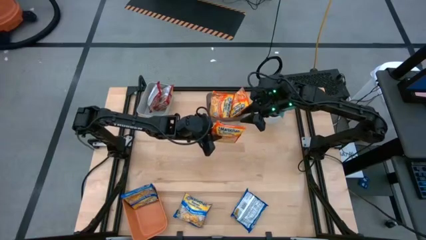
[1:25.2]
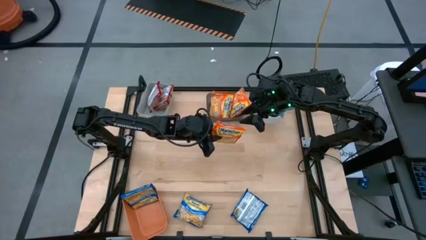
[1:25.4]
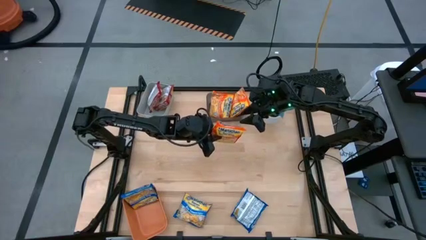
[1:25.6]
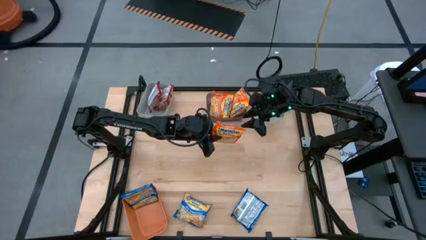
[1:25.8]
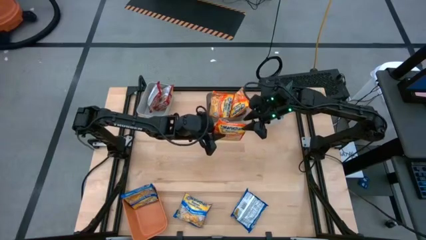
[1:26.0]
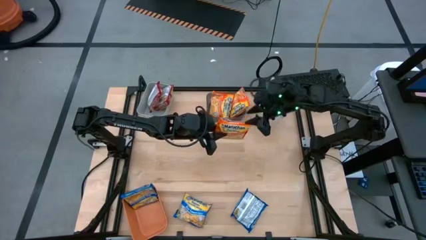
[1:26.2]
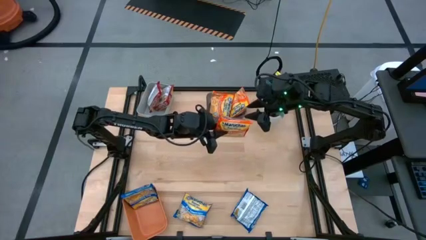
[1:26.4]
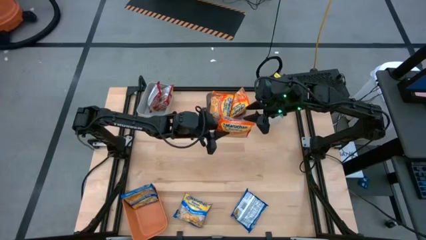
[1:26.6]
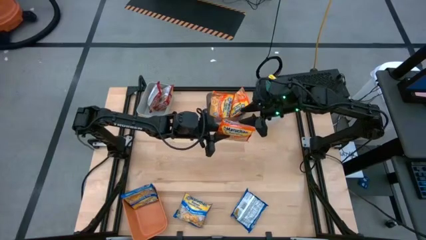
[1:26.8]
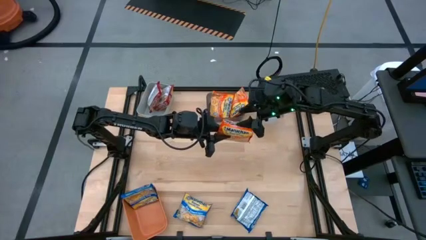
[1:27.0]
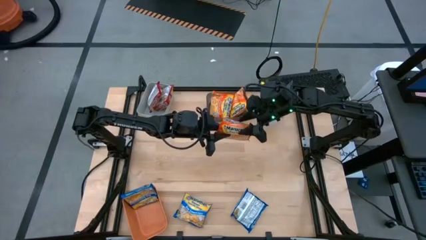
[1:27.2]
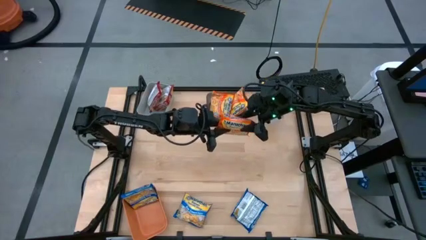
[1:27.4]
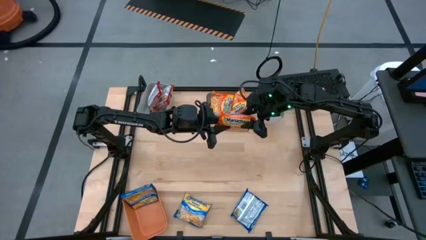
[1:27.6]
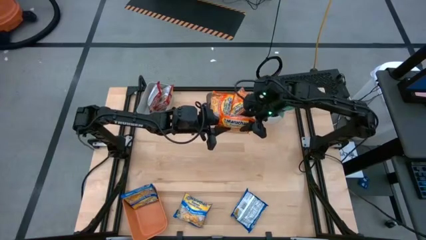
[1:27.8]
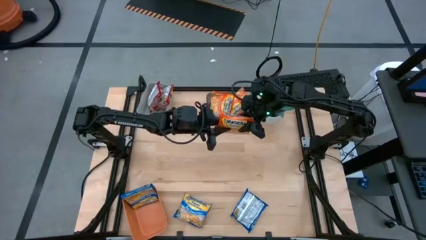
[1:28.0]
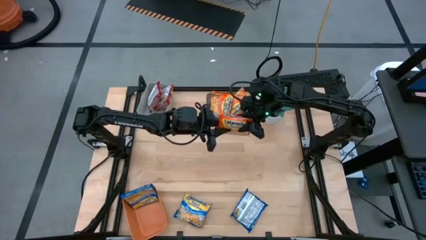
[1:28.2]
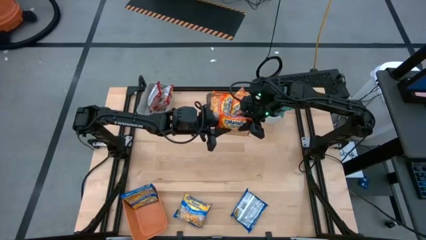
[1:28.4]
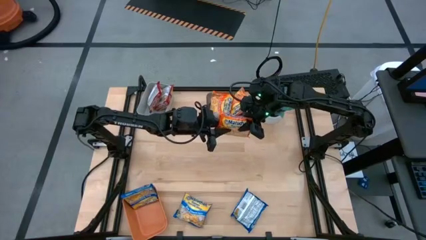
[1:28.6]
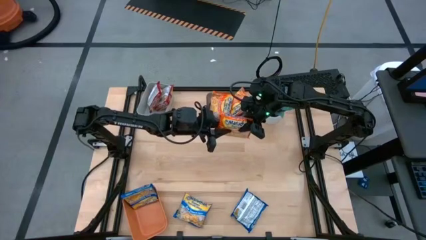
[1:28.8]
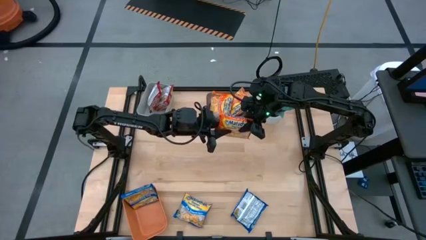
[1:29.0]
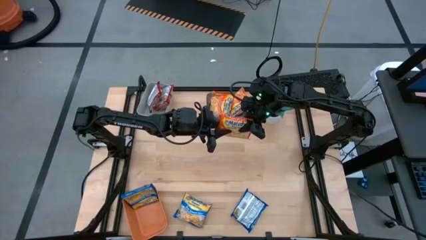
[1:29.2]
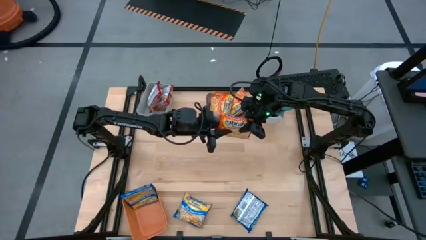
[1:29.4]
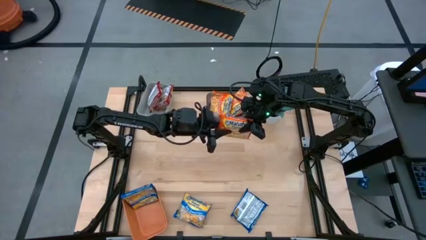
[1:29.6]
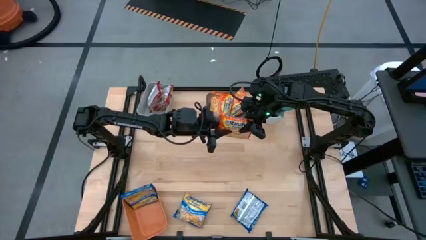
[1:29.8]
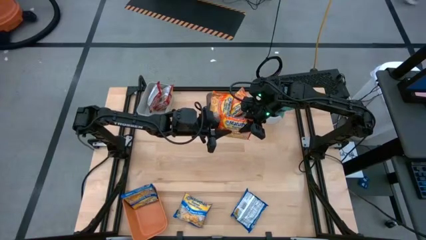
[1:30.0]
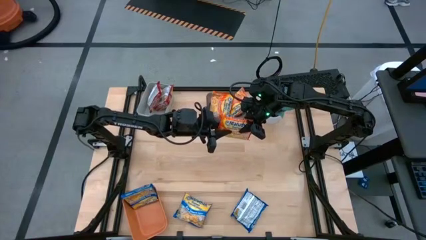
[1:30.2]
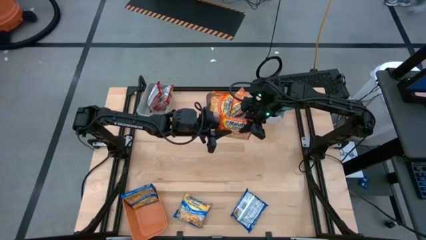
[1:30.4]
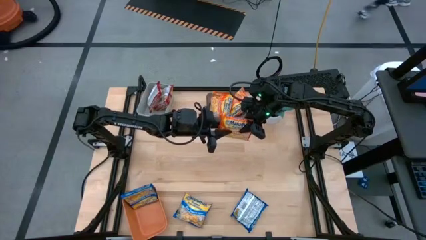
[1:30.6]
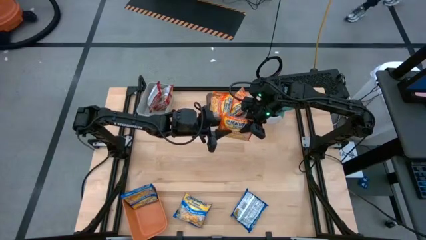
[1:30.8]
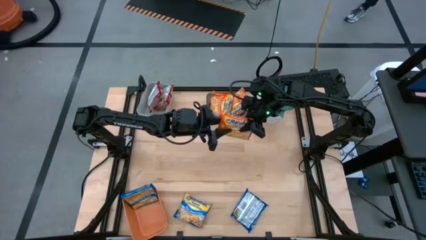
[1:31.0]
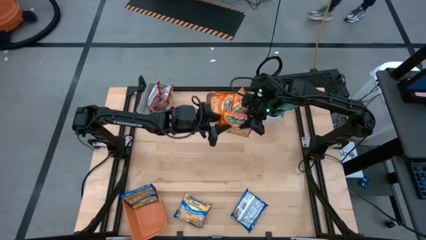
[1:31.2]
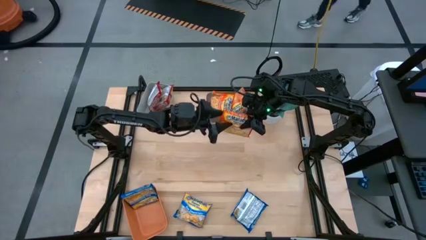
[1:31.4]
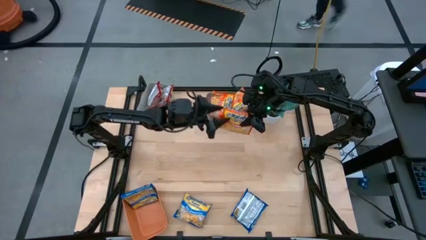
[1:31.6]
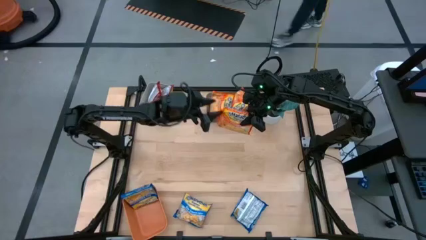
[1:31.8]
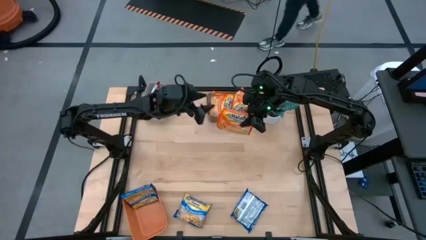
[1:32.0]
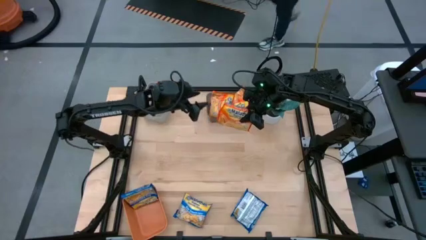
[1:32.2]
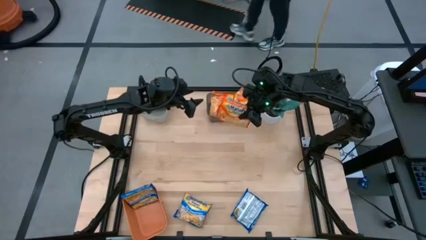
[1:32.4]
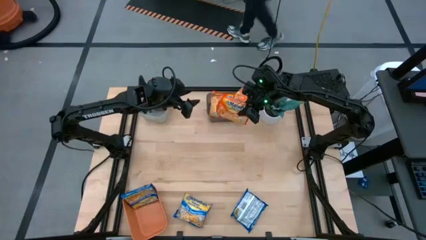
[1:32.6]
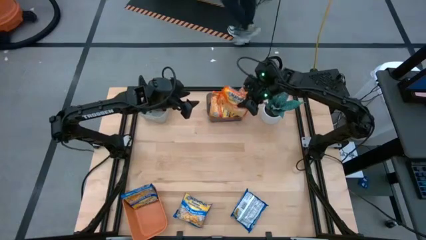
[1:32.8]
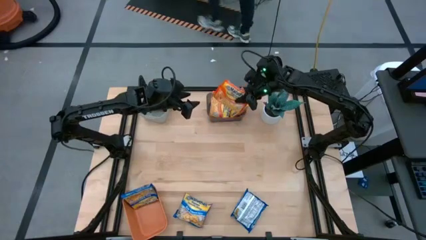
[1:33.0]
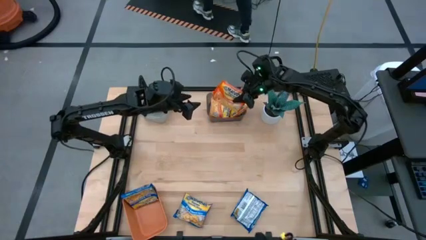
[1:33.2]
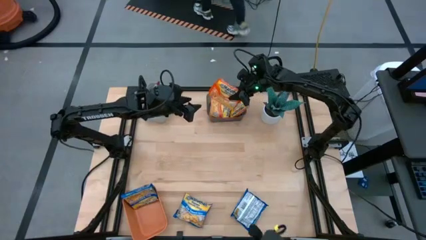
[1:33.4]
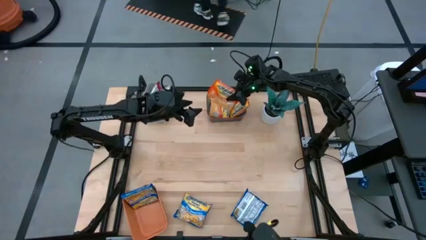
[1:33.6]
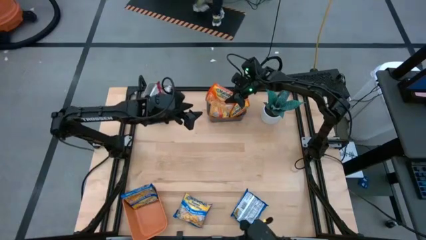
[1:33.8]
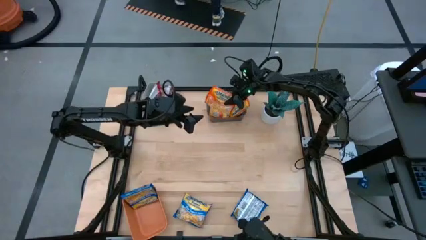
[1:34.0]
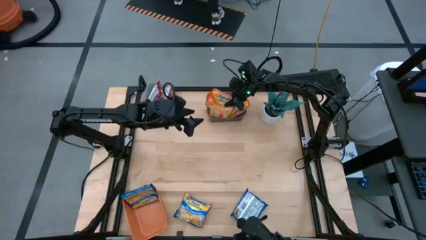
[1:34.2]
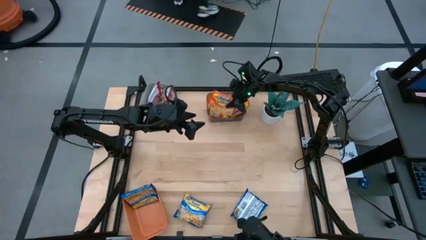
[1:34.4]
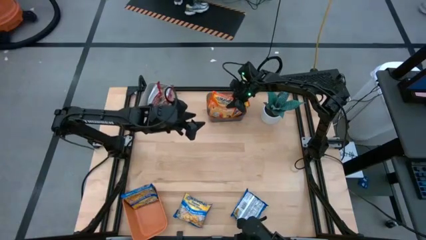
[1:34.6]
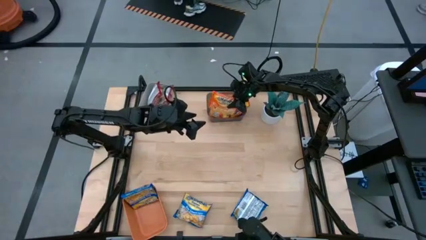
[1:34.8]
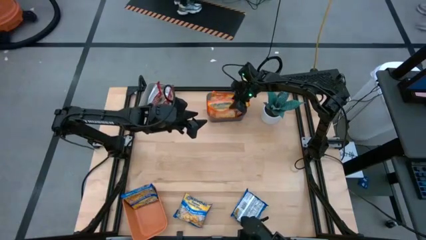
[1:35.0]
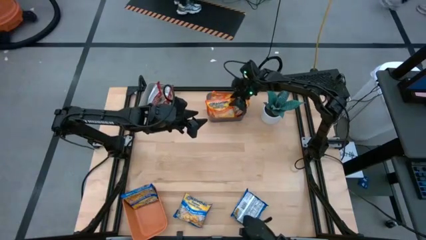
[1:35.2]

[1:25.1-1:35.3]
Task: Sort Maruchan noodles
Put the orange noodle pack into the black bin

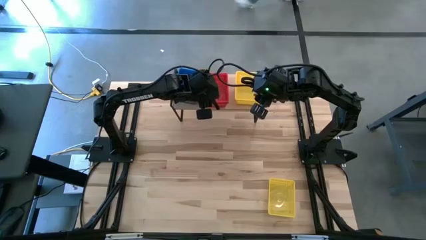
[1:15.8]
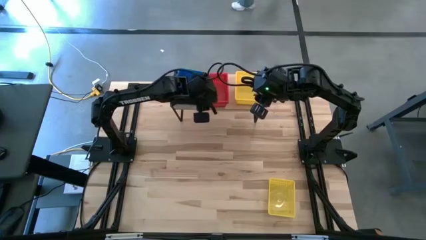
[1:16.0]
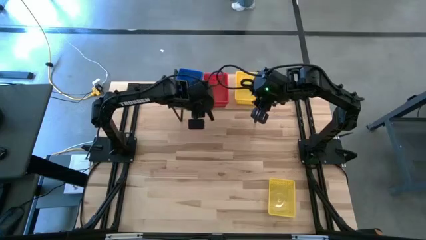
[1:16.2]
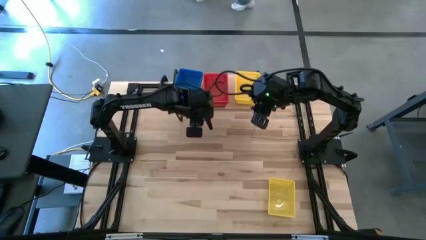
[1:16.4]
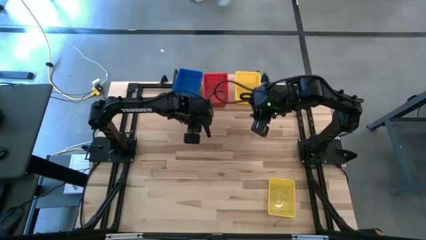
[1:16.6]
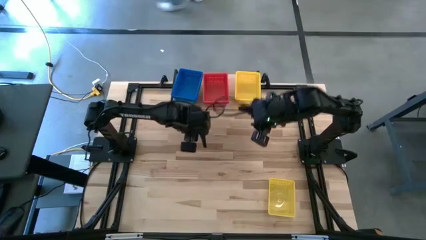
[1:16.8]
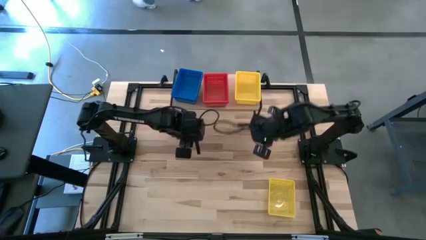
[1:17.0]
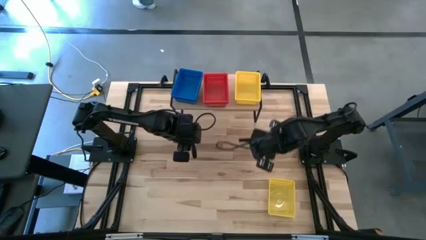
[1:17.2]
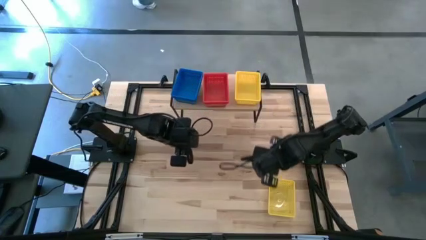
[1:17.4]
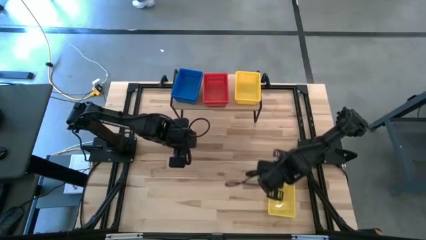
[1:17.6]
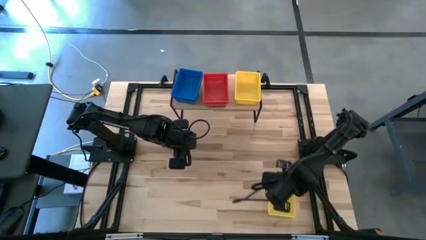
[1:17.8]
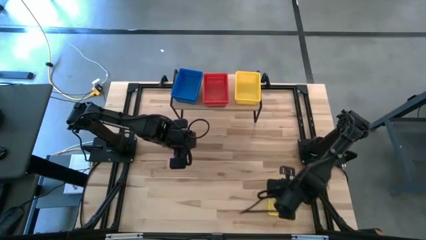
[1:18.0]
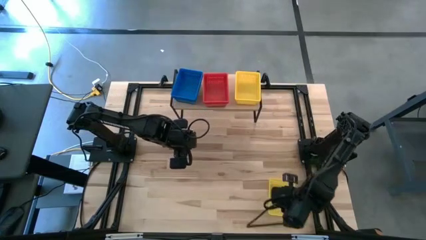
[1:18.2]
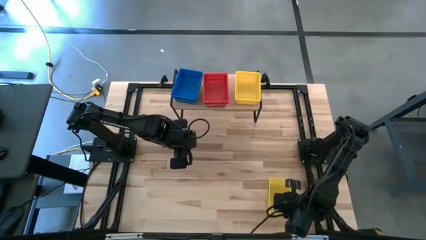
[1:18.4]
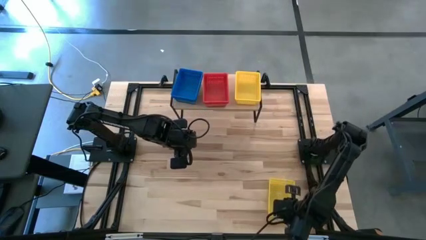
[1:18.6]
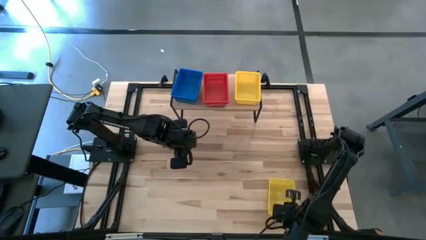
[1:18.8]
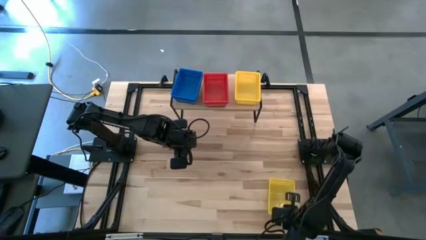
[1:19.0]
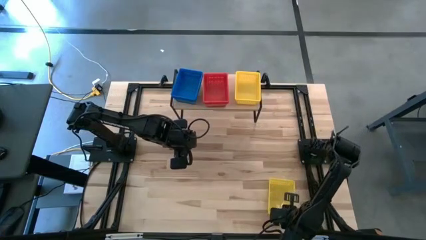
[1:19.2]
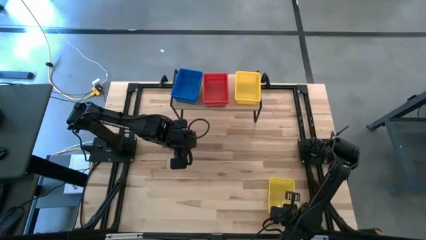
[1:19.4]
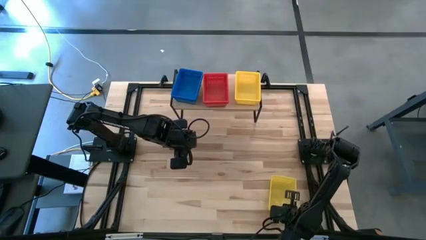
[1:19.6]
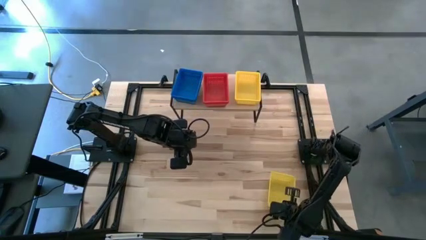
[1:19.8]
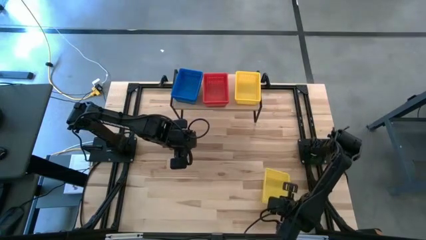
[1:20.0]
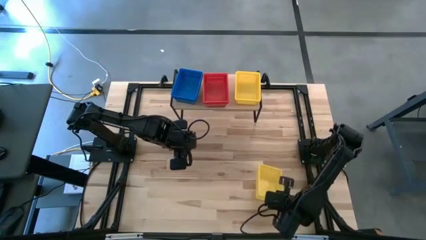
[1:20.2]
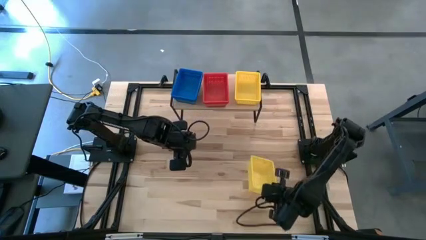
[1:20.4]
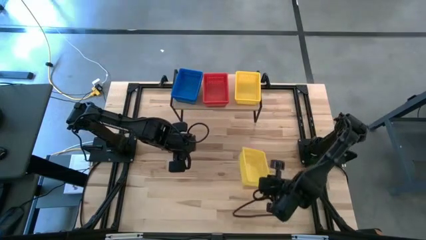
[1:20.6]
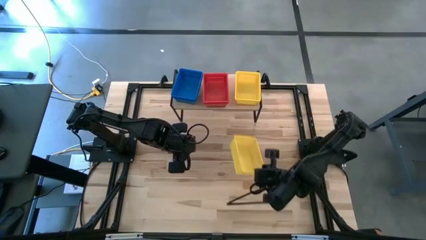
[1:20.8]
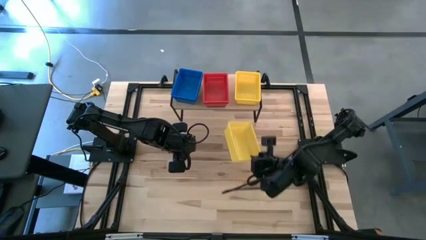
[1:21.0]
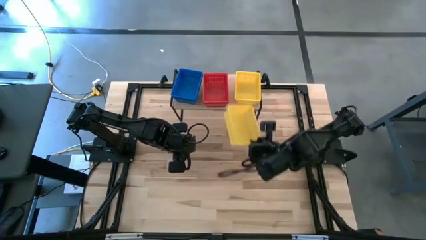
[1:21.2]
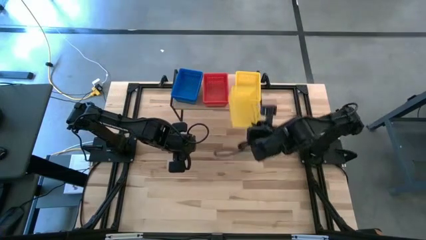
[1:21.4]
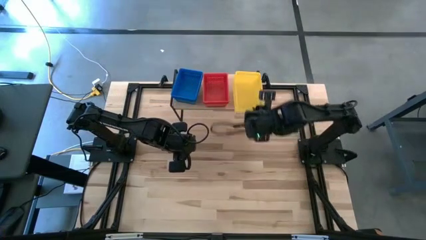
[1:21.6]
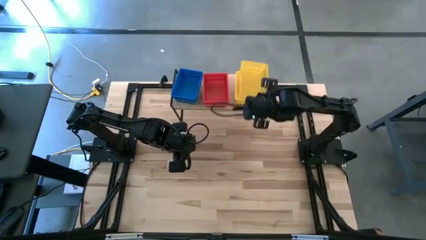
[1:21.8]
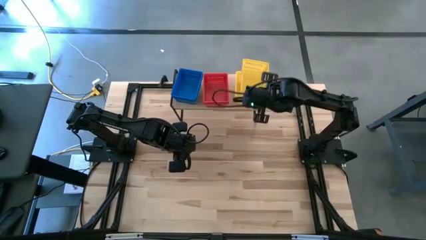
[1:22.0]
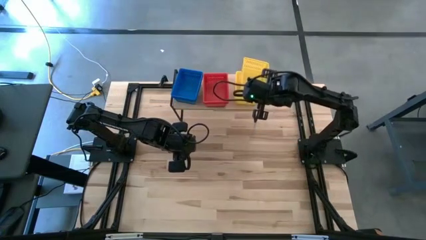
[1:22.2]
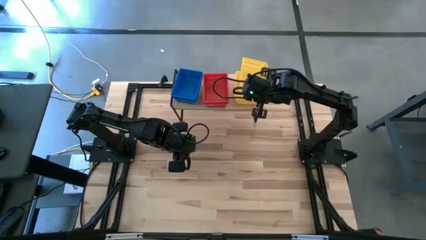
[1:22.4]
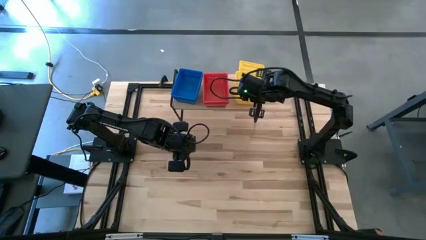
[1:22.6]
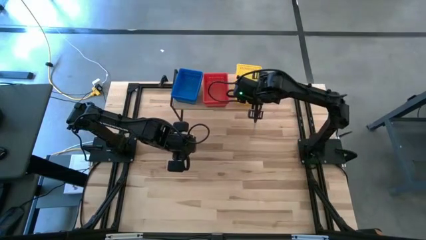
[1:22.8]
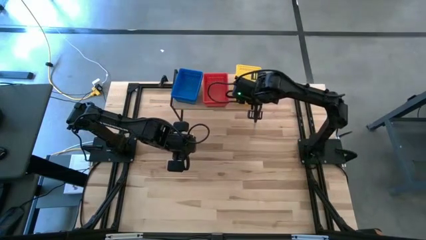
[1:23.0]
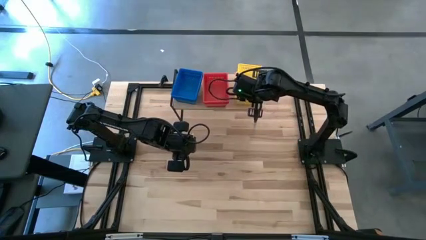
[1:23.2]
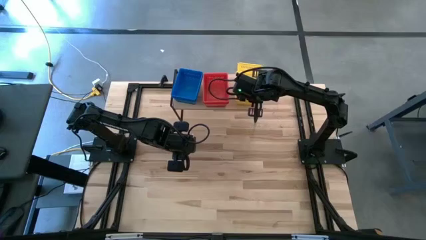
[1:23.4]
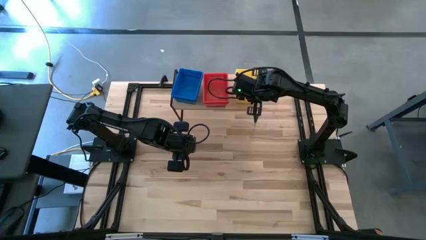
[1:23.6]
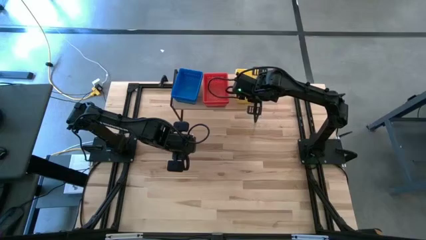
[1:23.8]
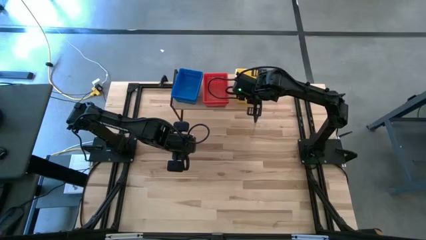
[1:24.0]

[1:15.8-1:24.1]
Task: Stack baskets on shelf by color
Stack the yellow bin on top of the yellow bin on the shelf
